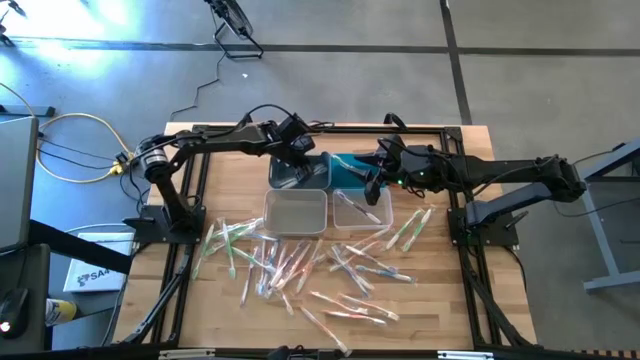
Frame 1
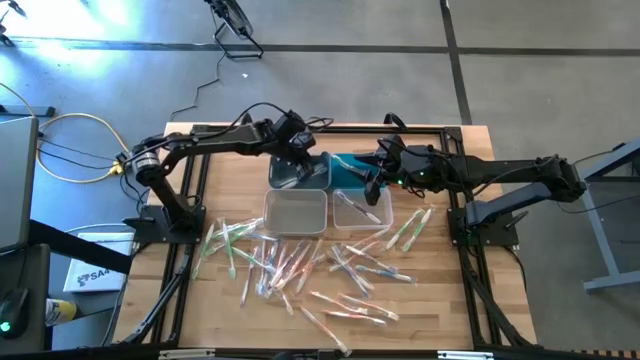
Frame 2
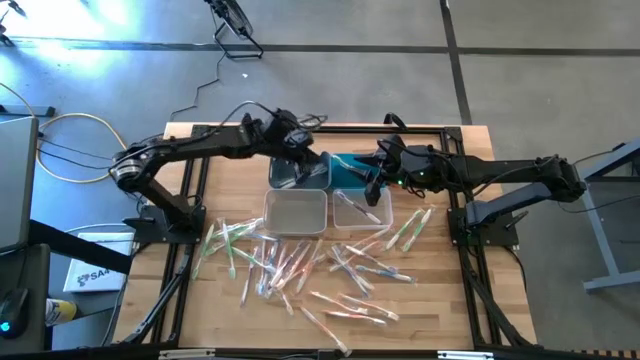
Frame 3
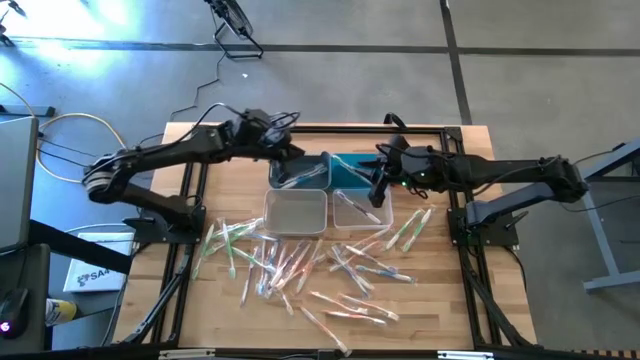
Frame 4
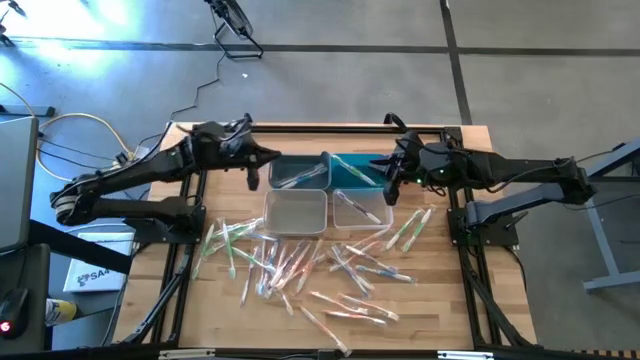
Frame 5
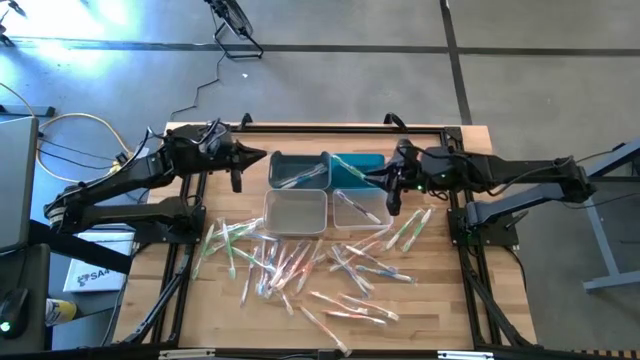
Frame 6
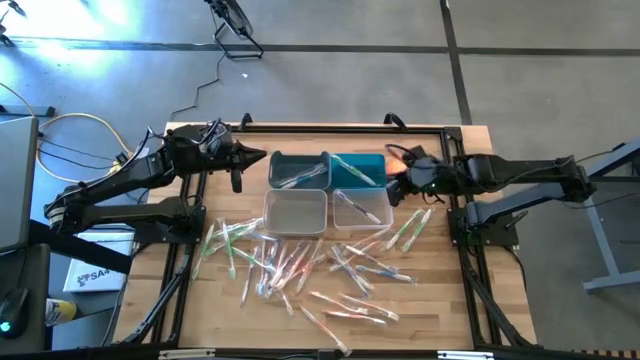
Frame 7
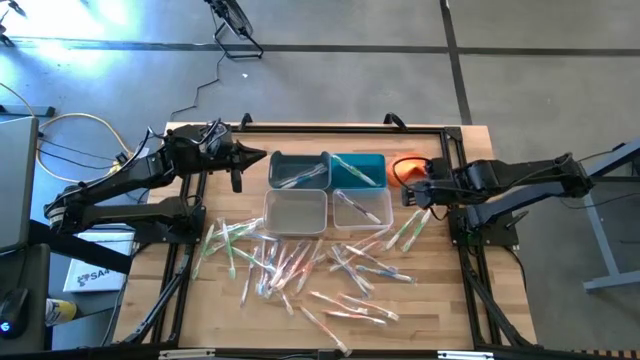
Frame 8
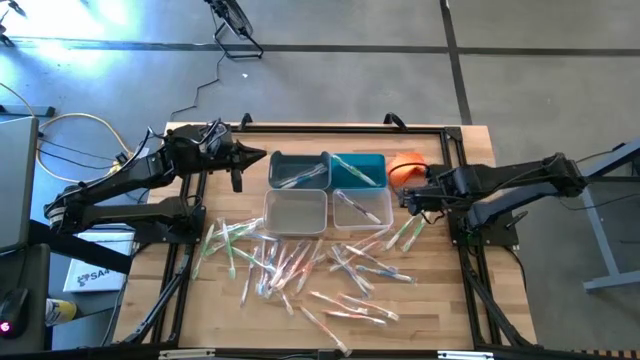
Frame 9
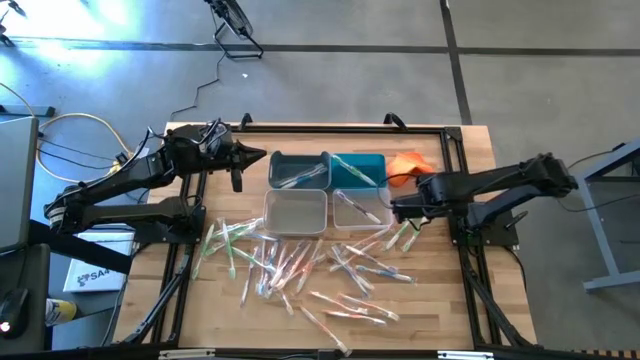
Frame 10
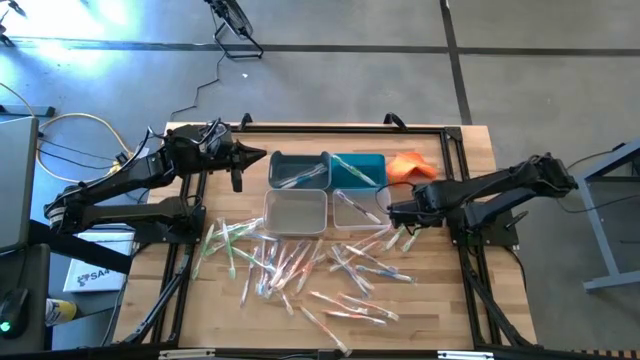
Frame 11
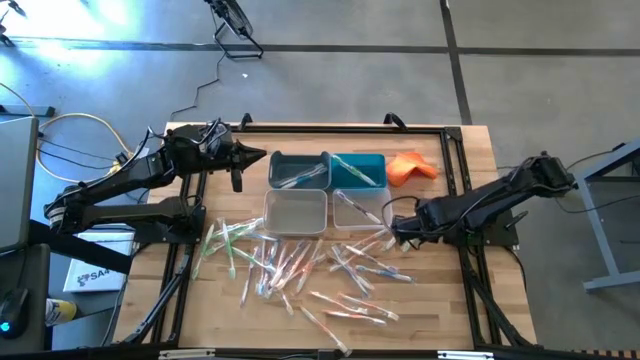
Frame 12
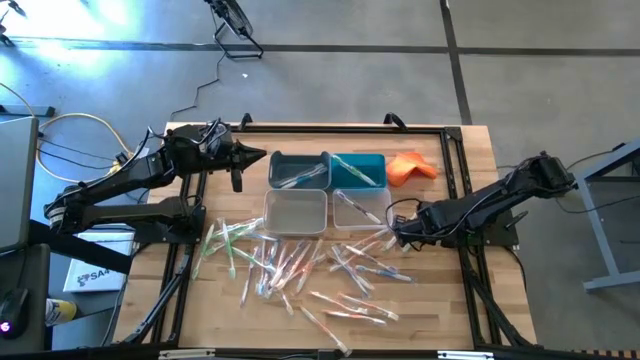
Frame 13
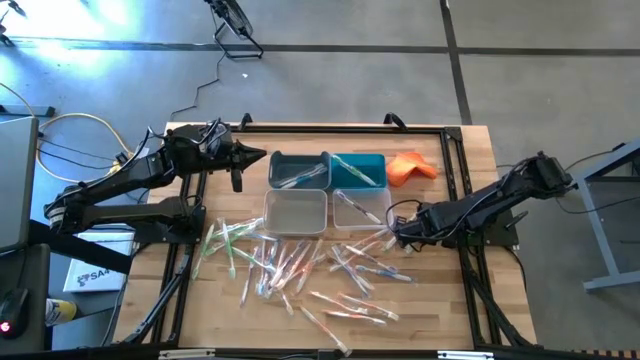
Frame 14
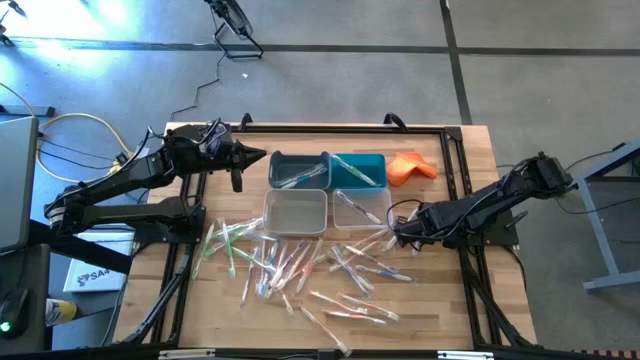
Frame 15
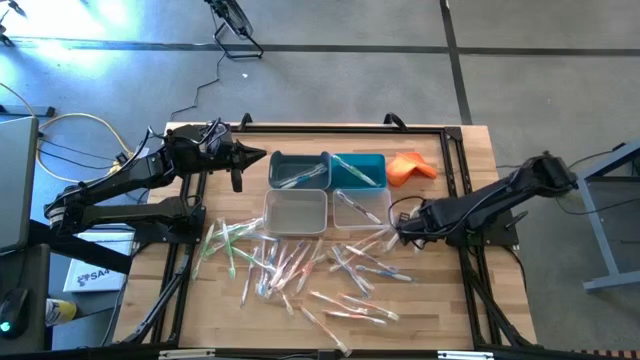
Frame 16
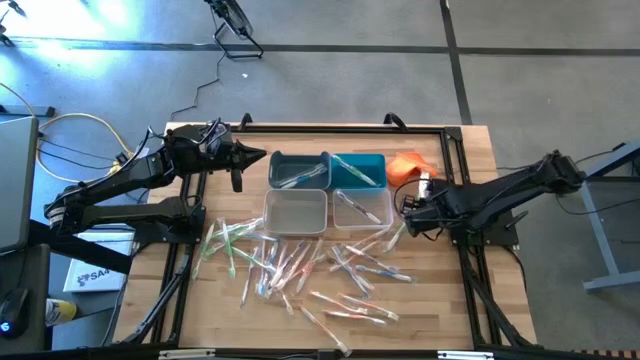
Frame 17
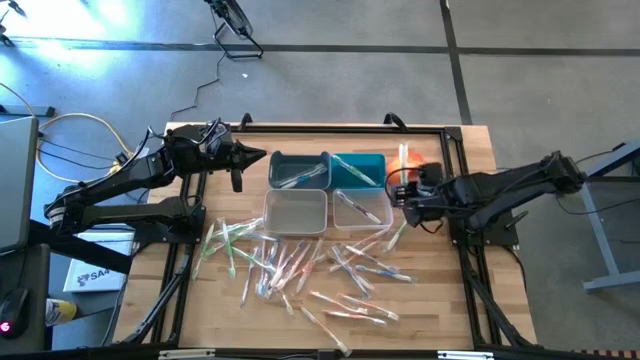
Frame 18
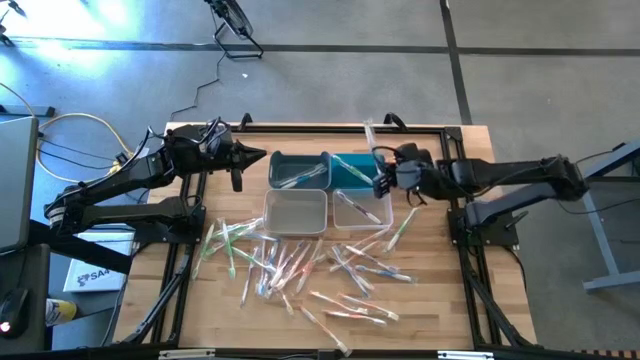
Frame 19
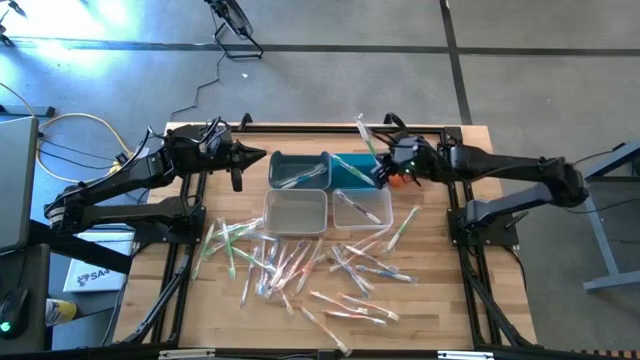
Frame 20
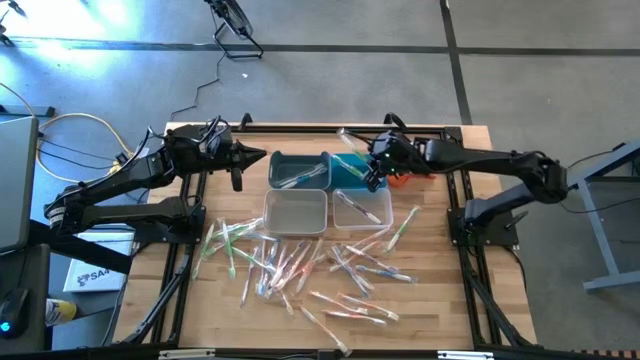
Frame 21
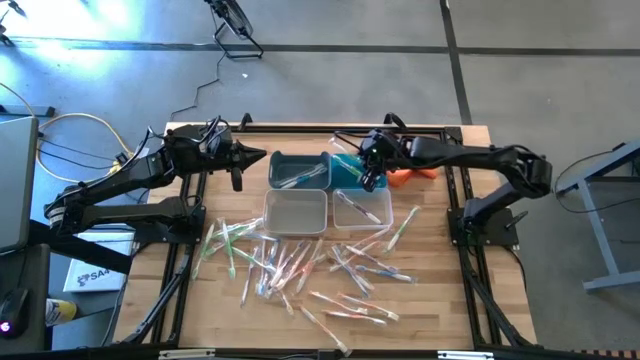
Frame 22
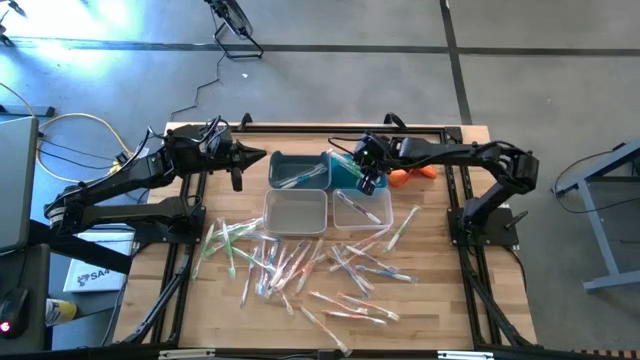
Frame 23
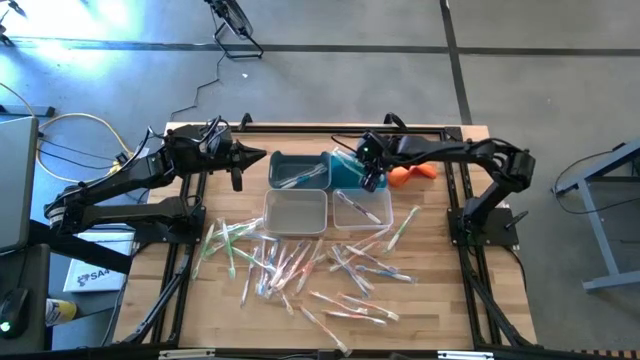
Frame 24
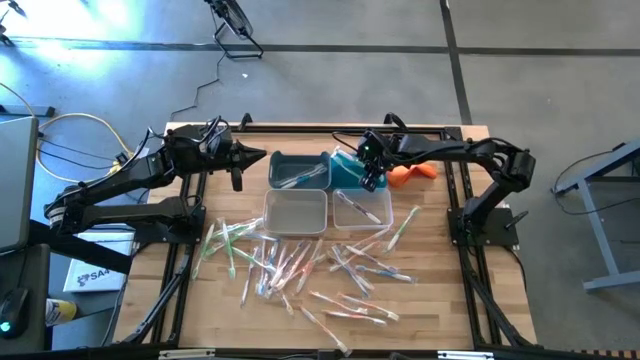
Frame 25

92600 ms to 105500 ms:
Task: Pick & Place Toothbrushes
Put the green toothbrush into the blue bin

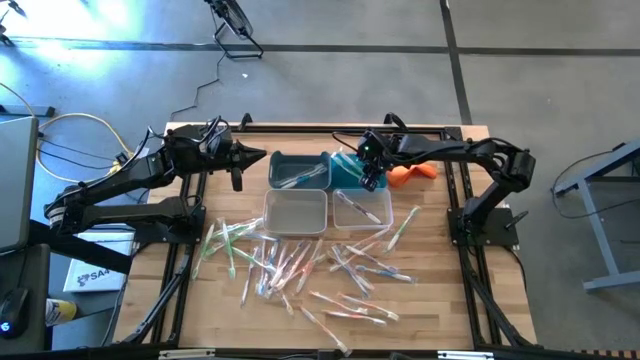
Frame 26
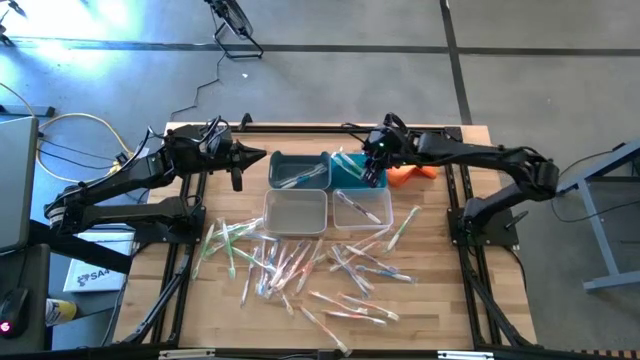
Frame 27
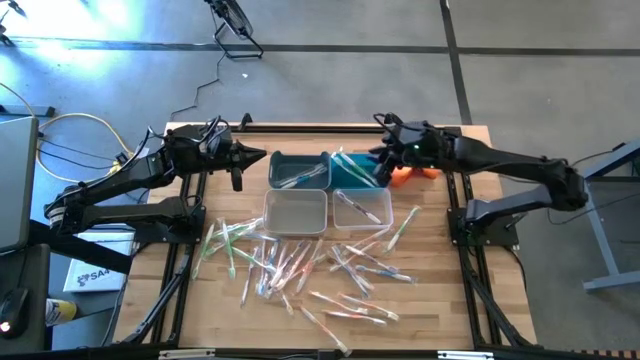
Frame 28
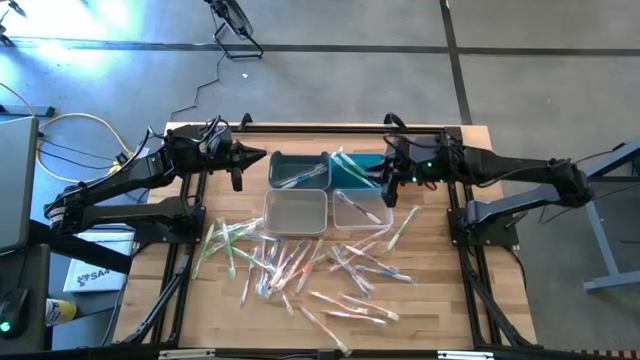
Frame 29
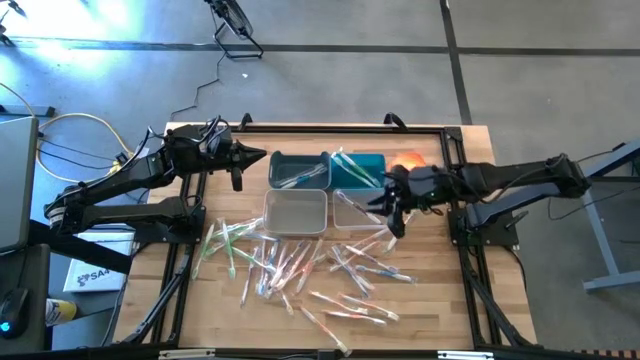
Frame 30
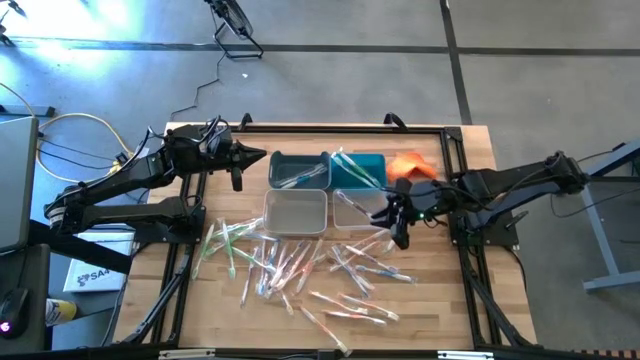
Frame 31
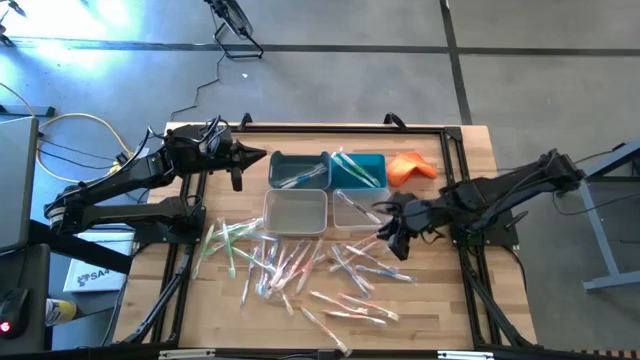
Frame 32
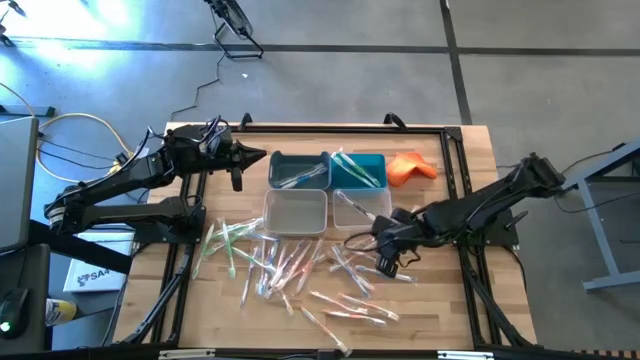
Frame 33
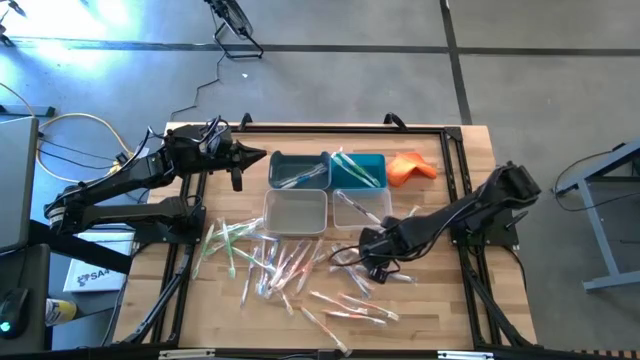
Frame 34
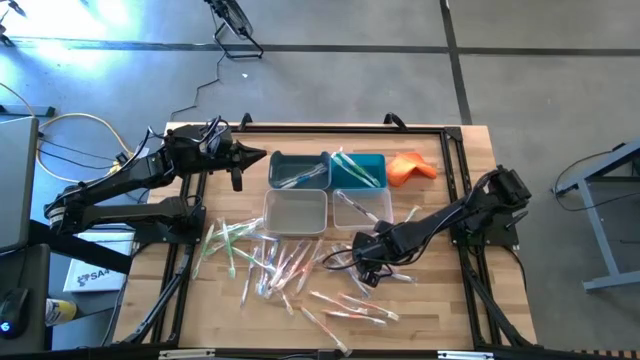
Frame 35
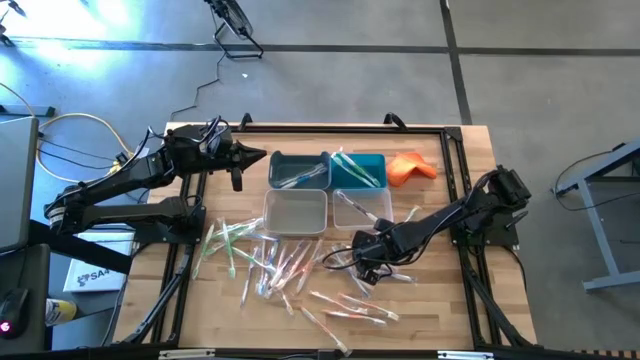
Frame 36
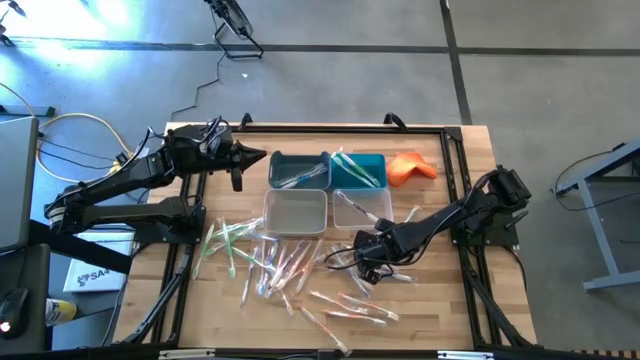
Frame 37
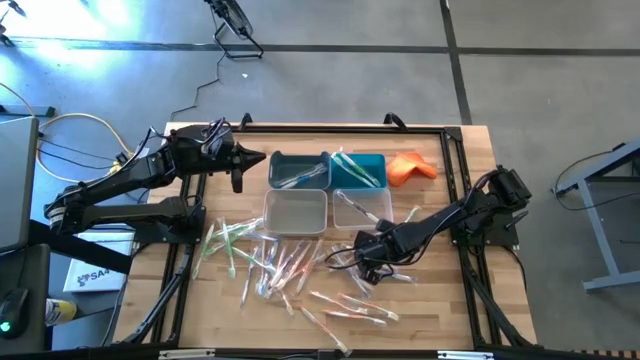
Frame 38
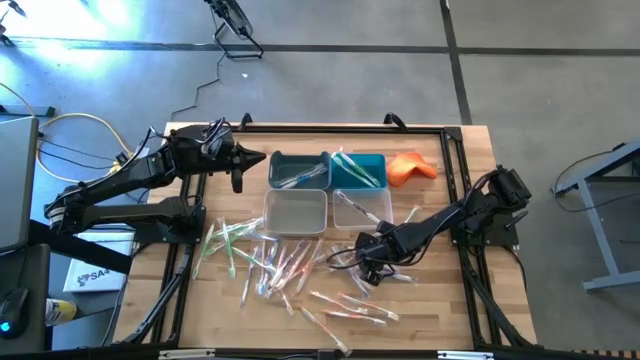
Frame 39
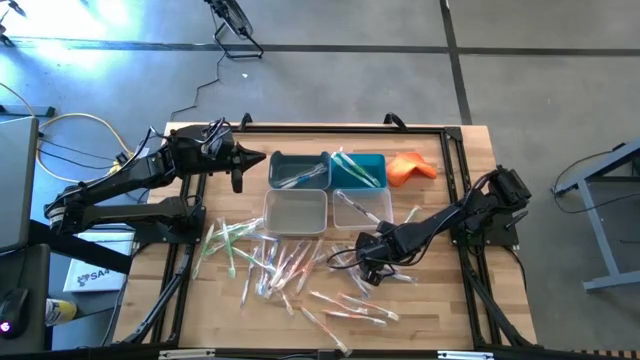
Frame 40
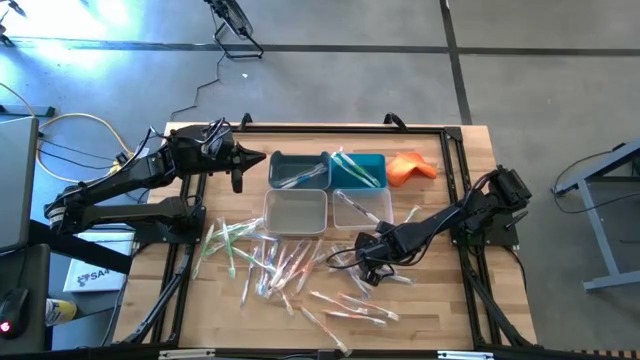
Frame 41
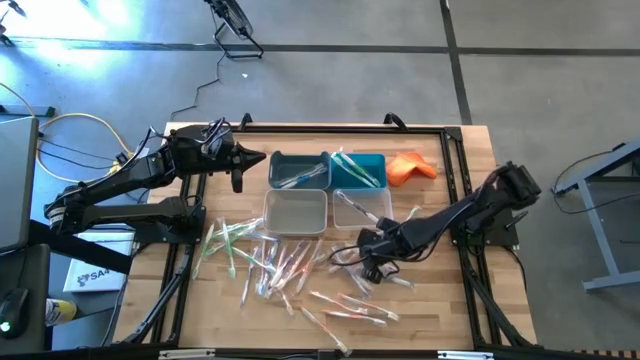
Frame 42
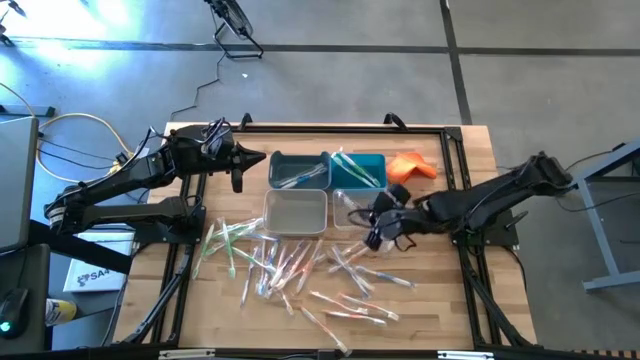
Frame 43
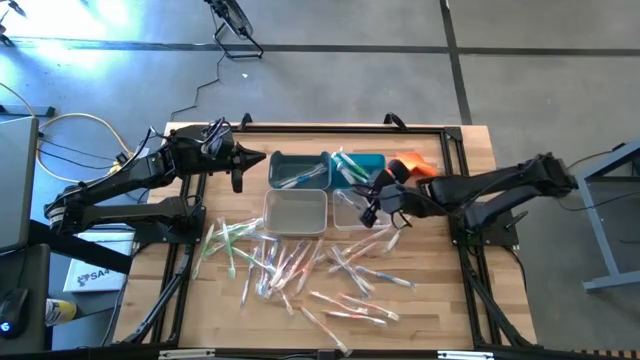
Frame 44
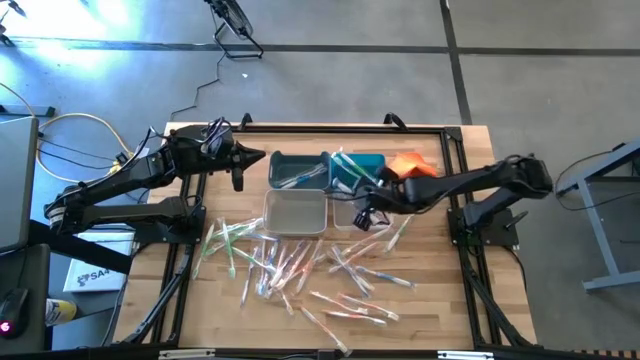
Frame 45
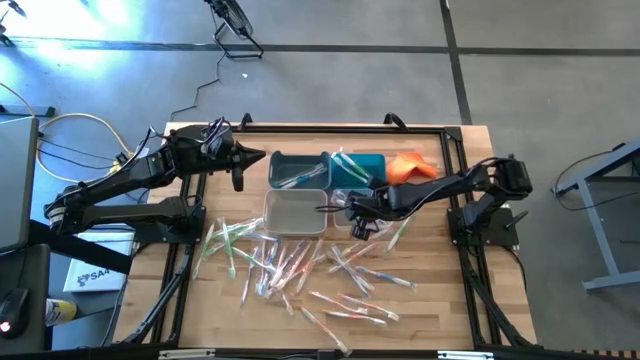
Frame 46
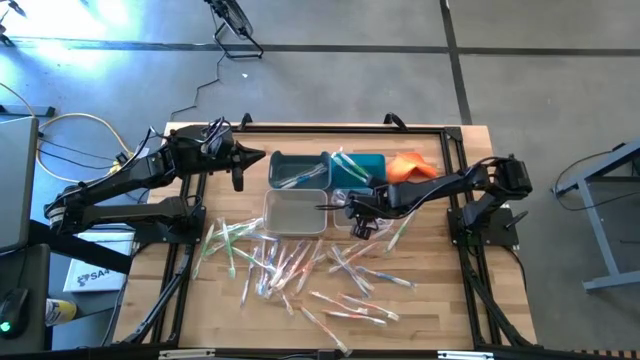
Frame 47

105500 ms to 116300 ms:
Put the purple toothbrush into the transparent bin
